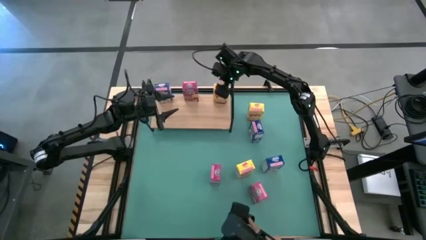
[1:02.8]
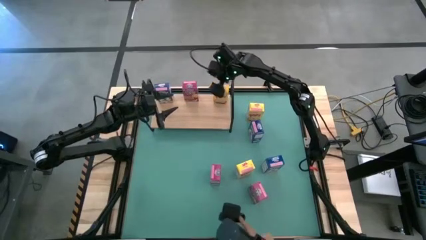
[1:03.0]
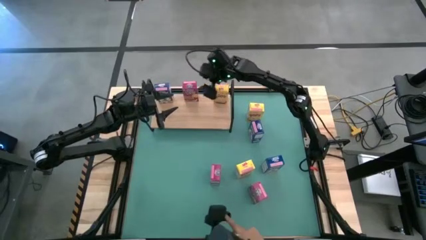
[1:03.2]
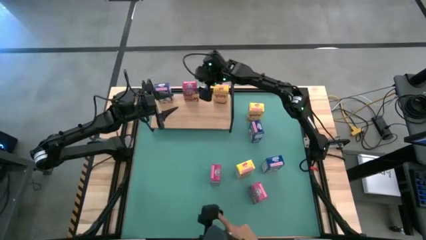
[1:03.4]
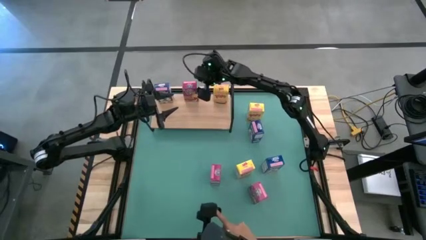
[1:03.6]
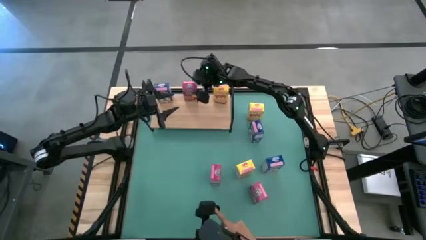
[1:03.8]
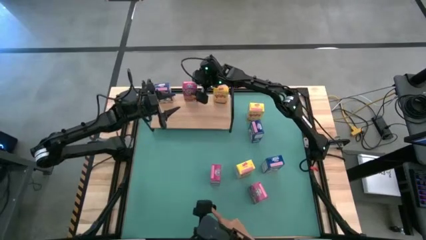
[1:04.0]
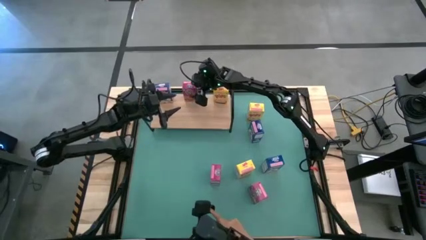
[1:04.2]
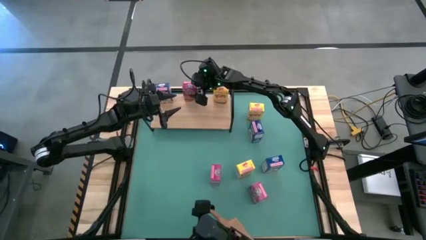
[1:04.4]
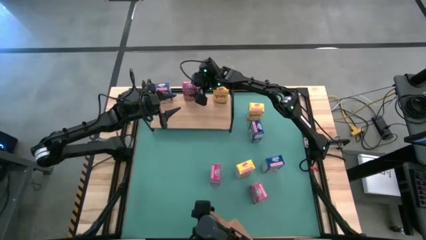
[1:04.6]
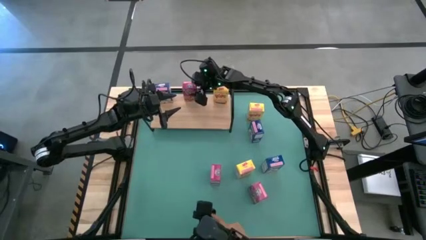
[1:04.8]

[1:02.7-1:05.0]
Task: Stack cereal on shelf
Adjust the pink cereal box

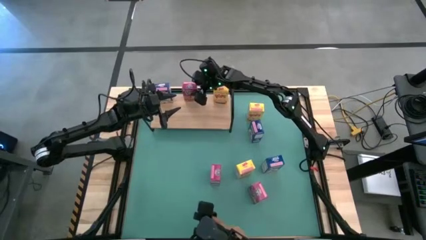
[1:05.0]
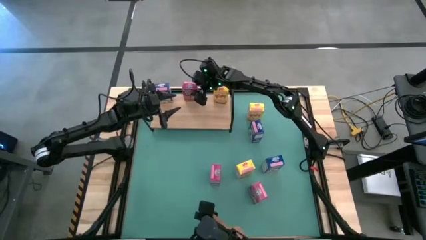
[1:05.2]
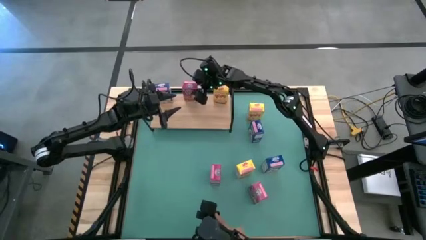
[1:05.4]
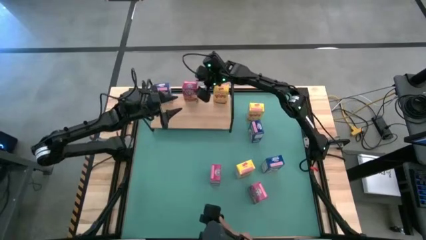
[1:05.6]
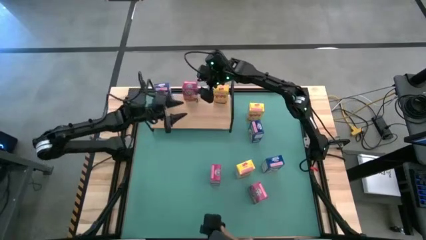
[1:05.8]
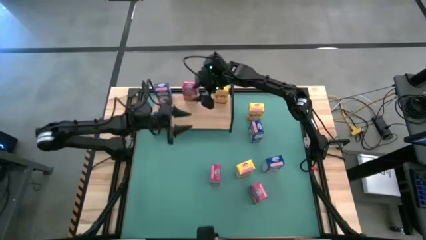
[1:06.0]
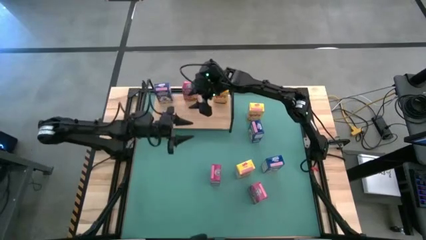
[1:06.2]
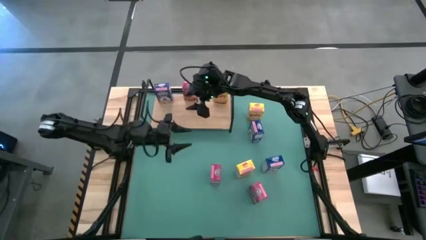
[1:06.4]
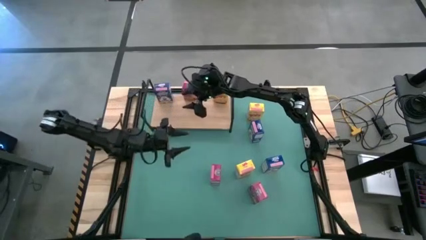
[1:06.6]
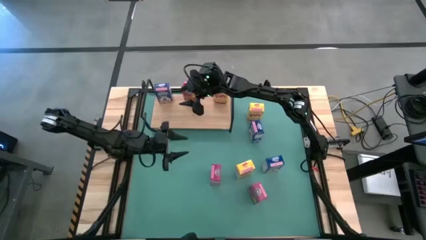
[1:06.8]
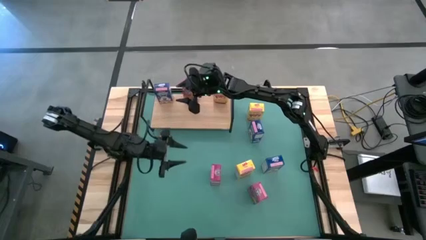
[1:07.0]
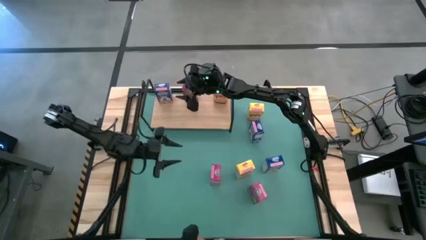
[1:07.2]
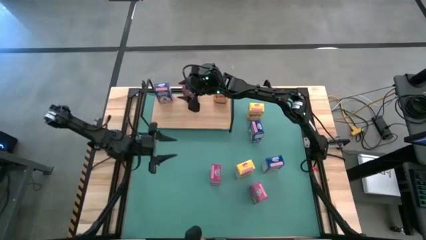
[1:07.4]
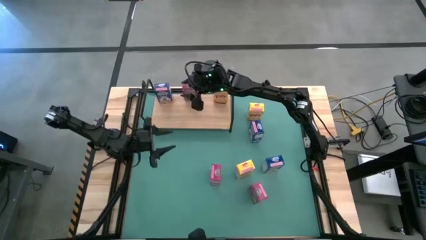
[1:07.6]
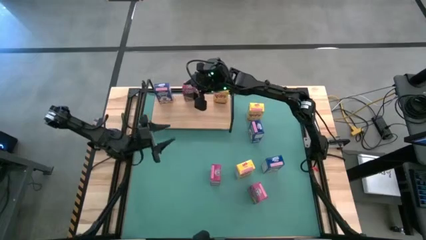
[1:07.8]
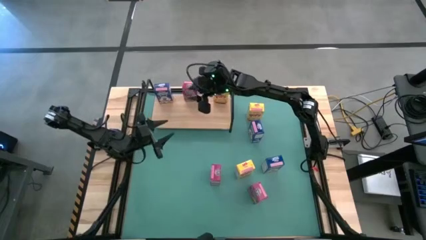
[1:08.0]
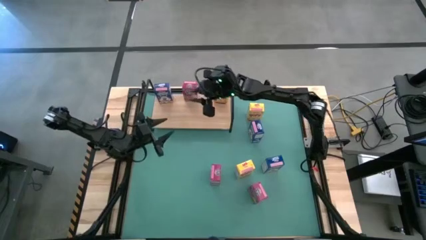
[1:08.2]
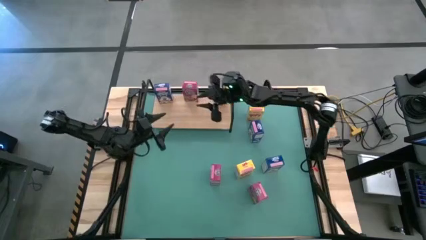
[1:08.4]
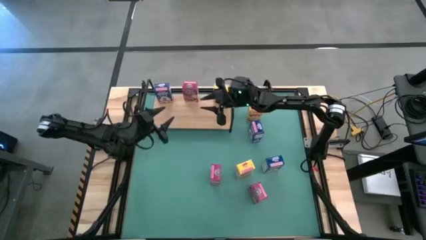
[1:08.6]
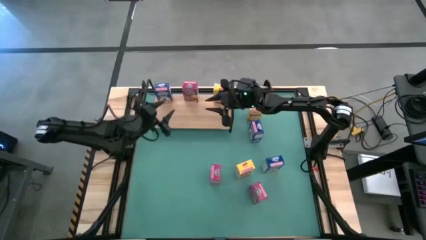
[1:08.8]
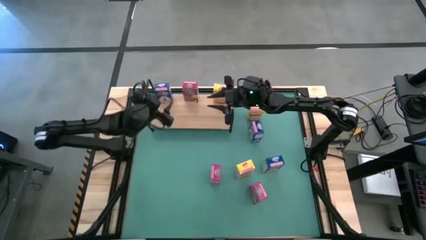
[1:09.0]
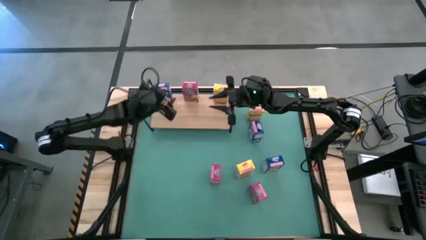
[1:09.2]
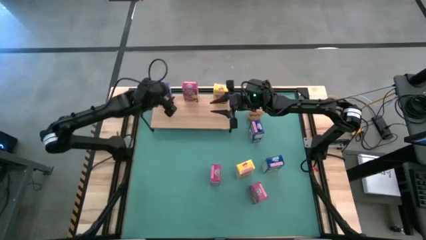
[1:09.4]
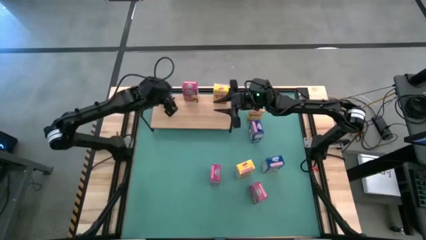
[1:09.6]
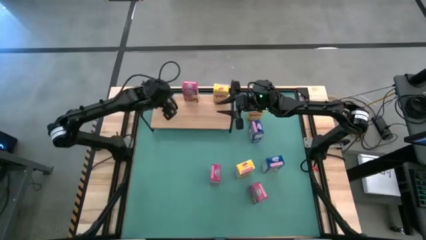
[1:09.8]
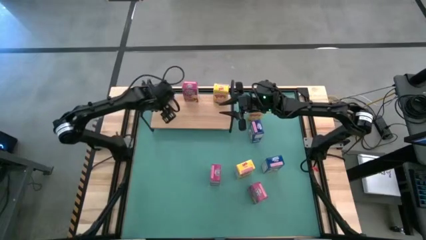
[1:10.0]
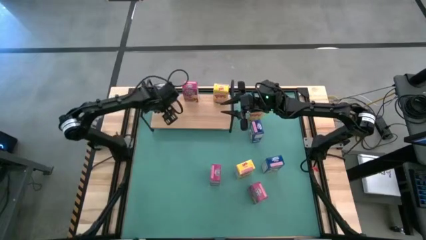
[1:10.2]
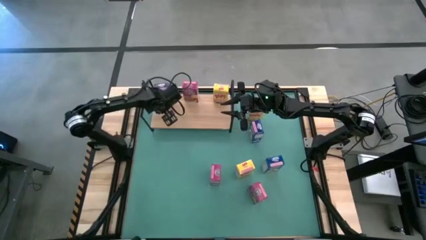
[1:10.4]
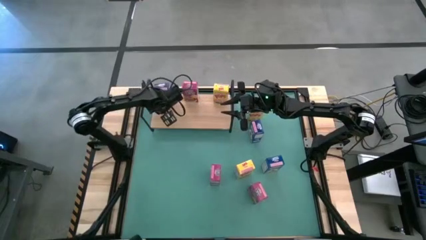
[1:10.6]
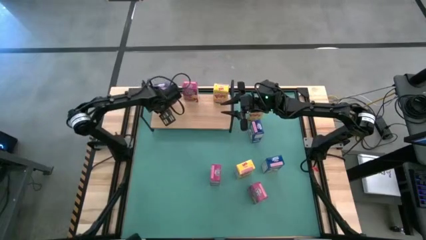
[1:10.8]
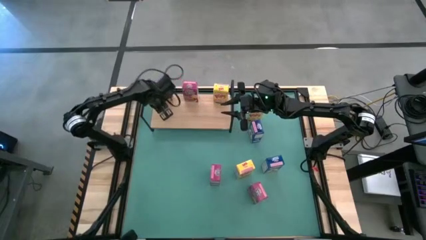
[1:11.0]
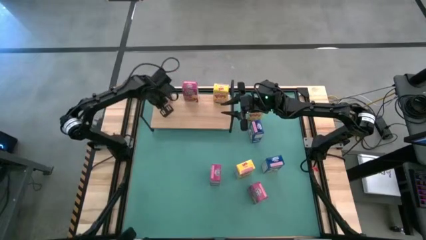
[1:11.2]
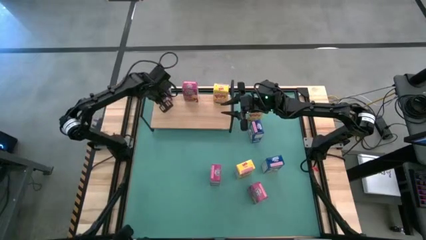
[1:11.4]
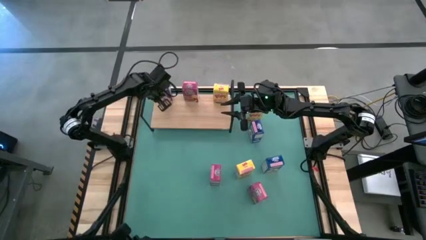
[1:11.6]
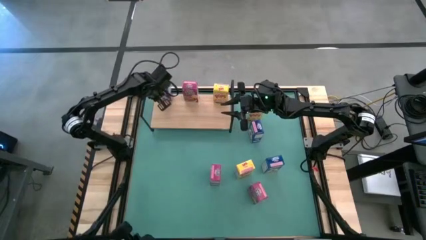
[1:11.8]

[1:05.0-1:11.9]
Adjust the blue cereal box

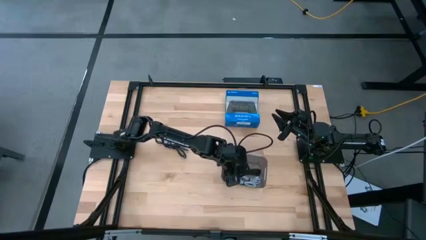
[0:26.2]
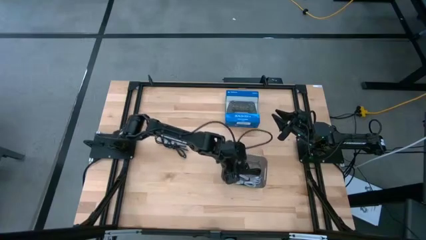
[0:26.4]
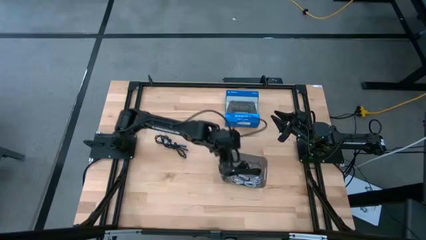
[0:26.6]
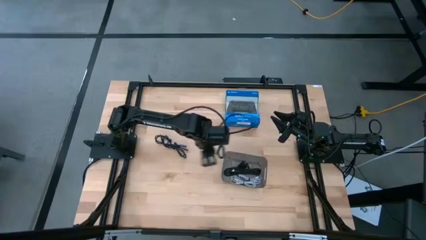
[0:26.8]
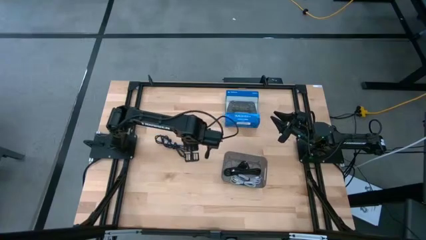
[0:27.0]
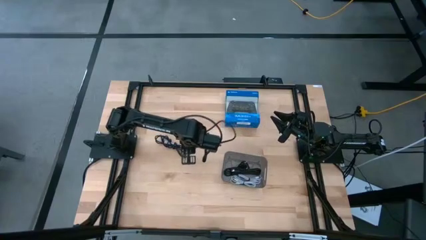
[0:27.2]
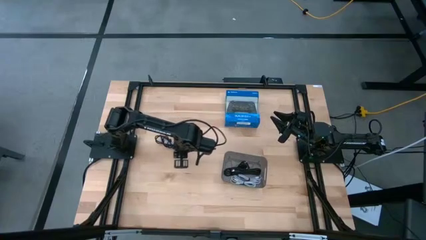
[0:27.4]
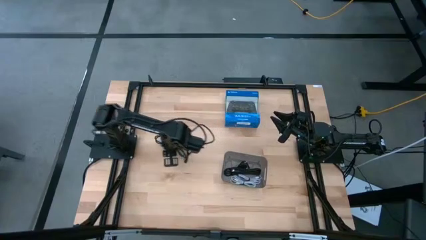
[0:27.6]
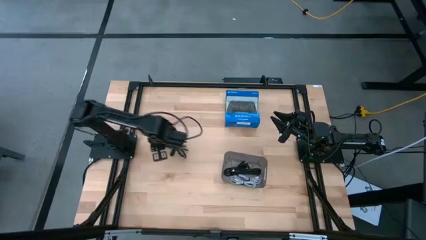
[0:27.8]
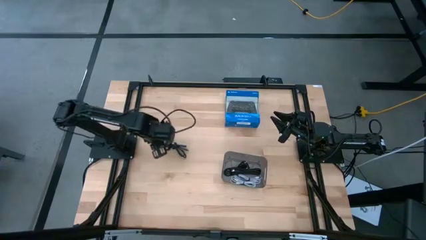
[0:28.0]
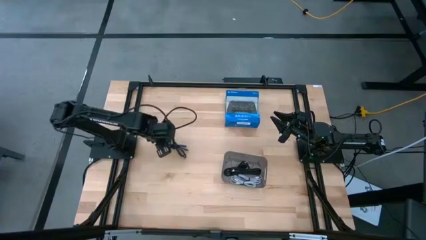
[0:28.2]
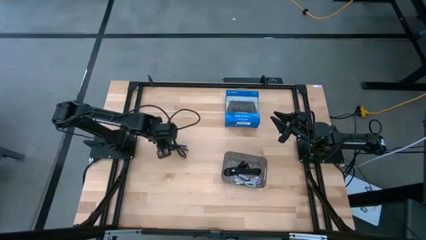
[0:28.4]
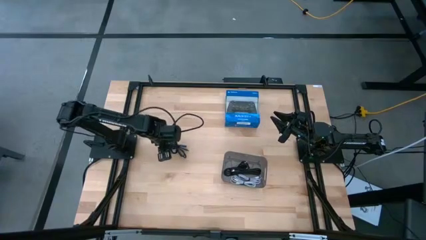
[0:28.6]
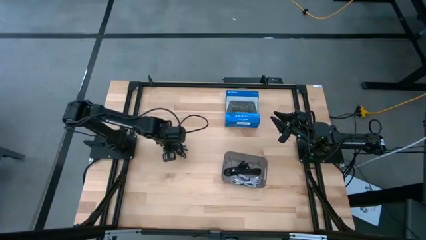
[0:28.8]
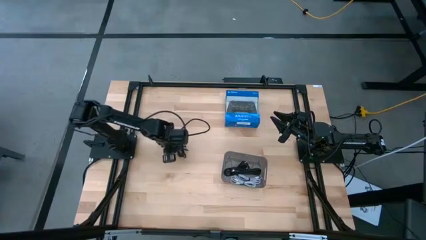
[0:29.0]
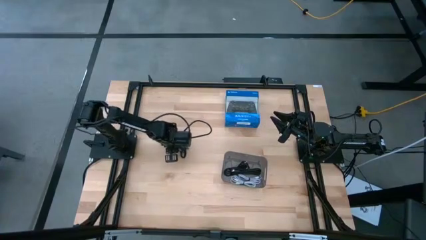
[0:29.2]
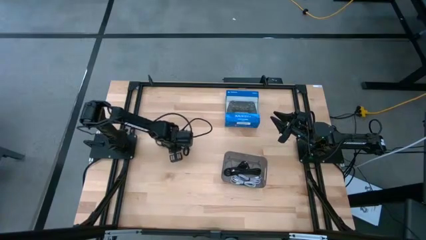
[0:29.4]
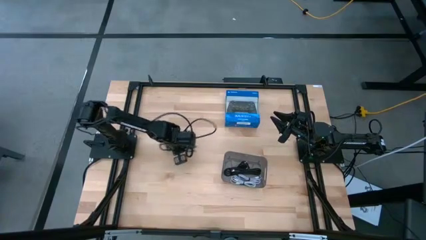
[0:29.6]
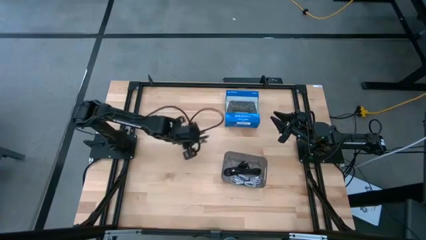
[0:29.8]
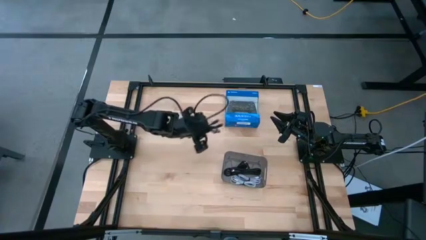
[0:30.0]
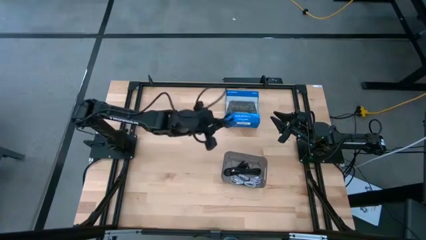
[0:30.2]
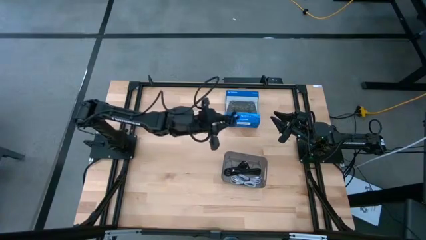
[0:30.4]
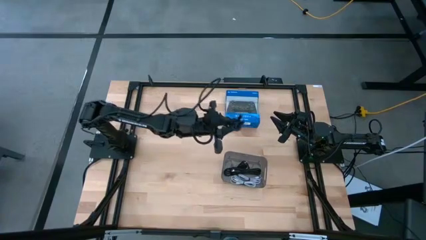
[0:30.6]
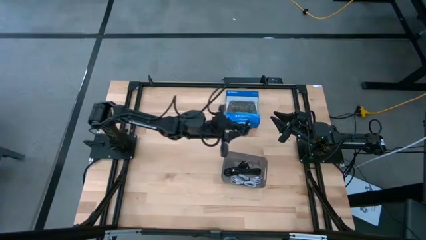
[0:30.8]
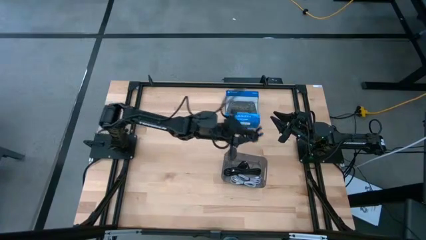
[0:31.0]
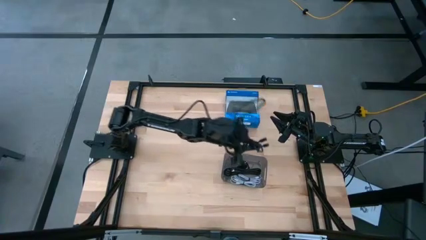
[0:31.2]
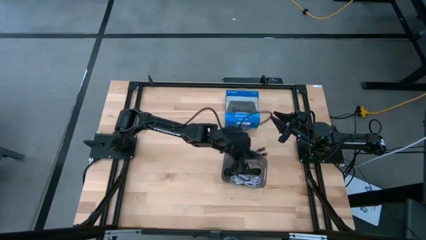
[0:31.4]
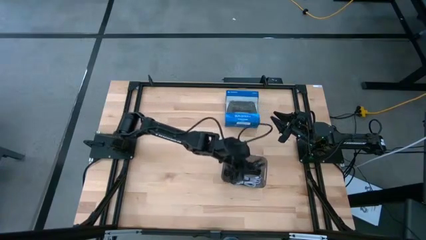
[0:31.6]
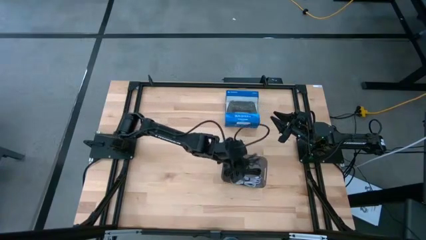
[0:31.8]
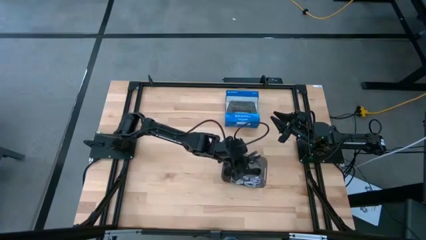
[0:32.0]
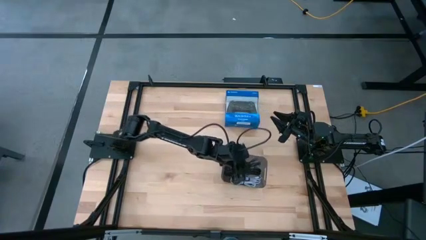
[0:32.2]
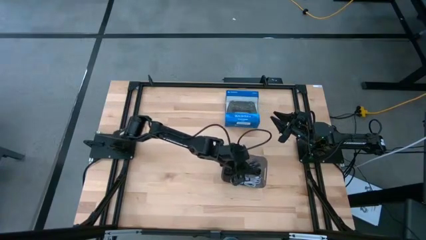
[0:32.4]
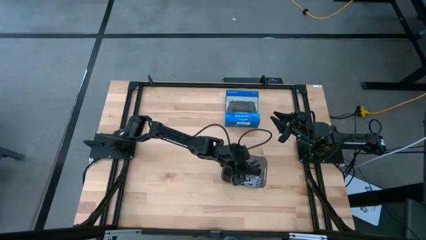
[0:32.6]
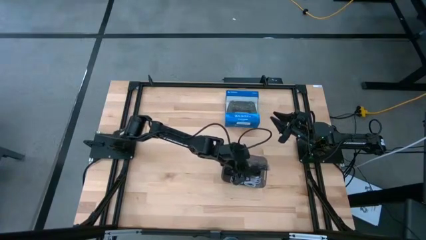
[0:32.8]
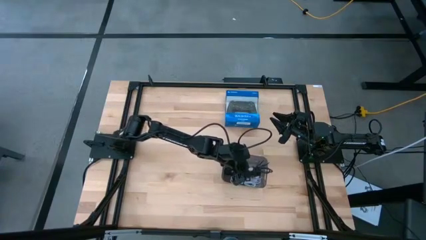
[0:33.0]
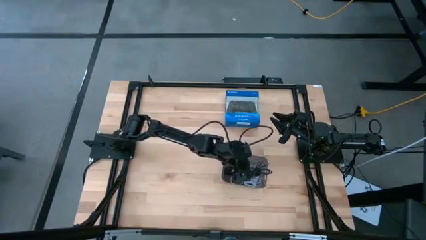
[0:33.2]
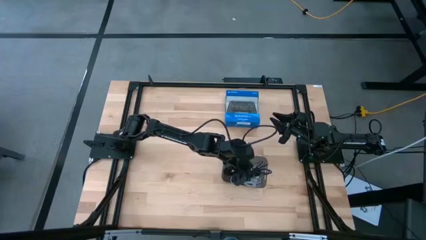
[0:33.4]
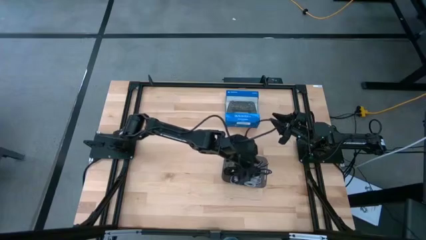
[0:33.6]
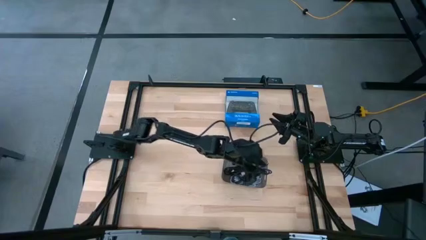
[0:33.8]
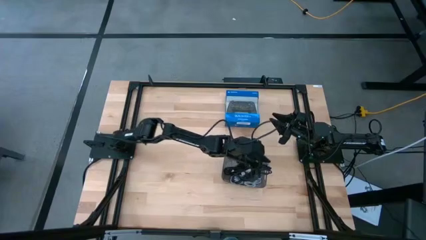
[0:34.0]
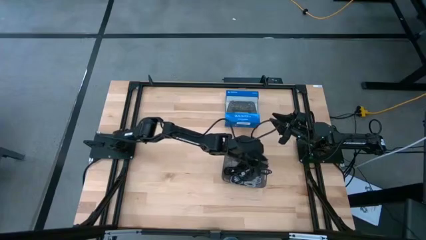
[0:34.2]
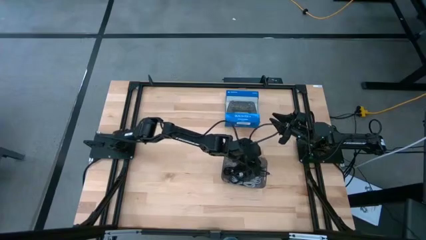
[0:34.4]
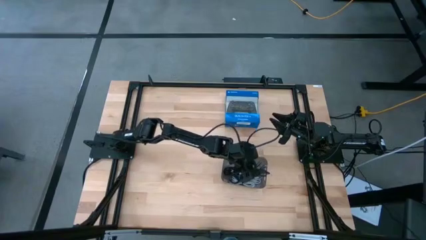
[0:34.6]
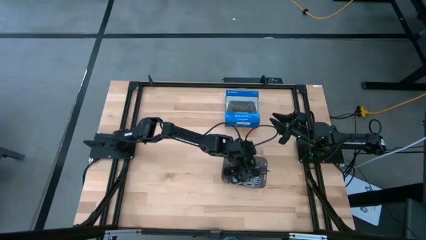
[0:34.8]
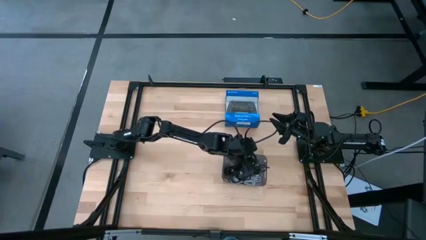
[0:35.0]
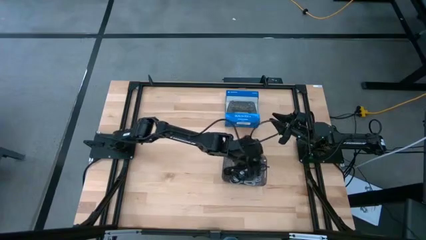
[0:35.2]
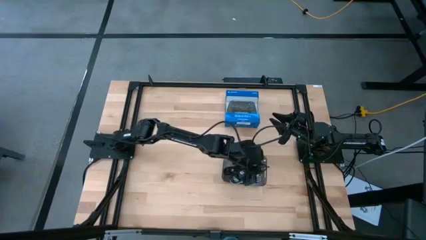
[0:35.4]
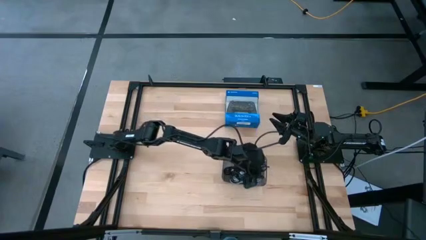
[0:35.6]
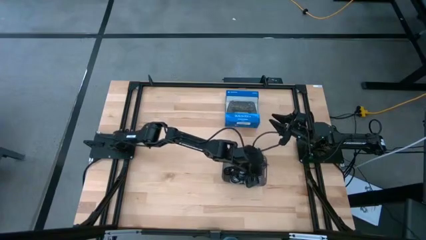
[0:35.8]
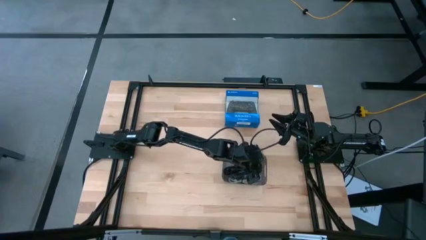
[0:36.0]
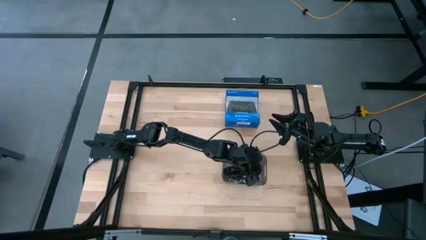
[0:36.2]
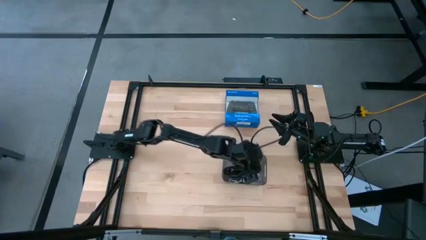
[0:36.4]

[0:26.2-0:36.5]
Task: Pick and place USB-C Cables
Put the black charger cable into the black bin
